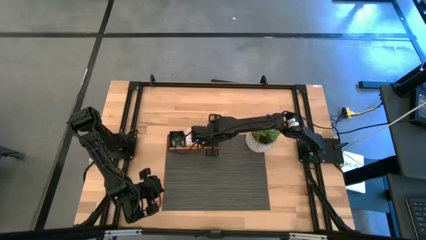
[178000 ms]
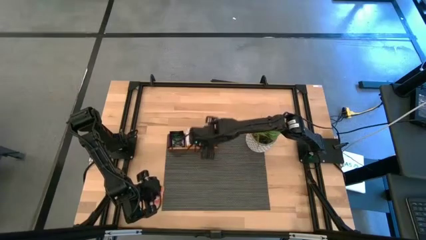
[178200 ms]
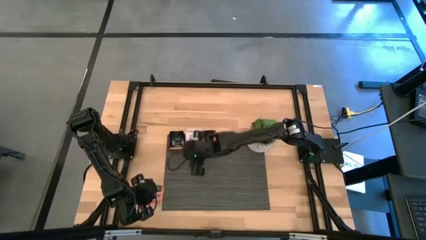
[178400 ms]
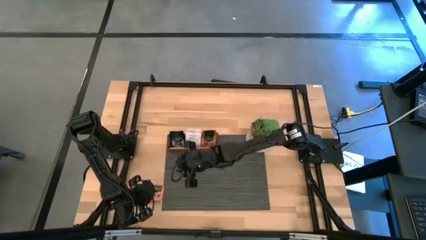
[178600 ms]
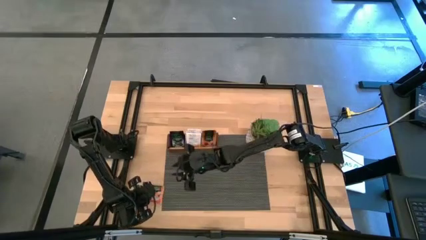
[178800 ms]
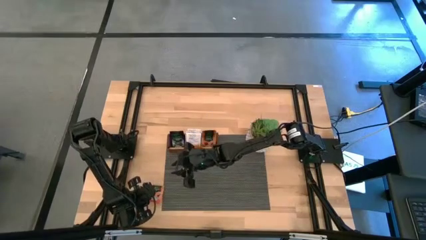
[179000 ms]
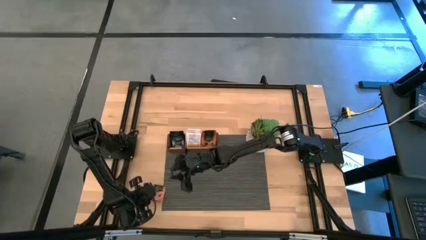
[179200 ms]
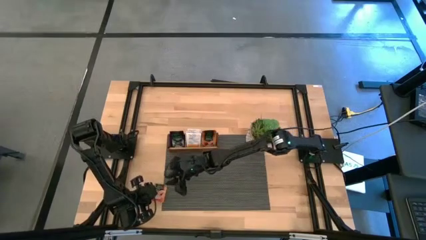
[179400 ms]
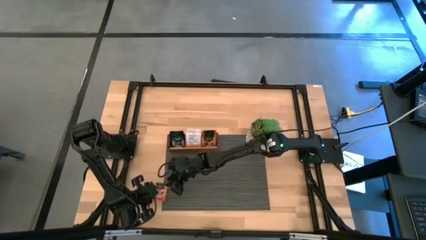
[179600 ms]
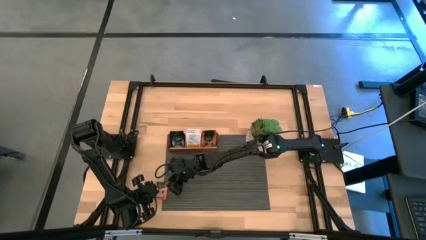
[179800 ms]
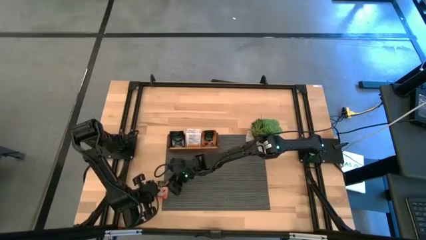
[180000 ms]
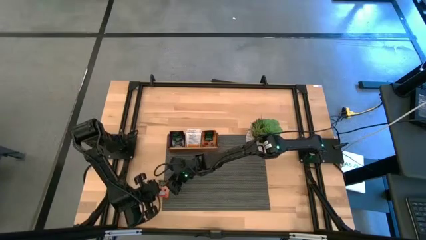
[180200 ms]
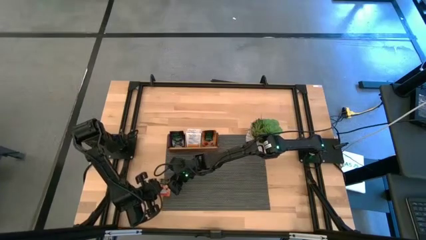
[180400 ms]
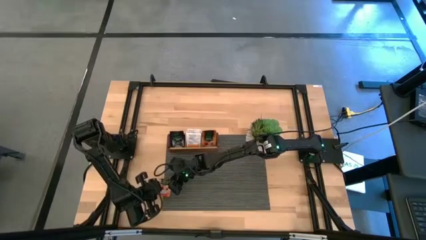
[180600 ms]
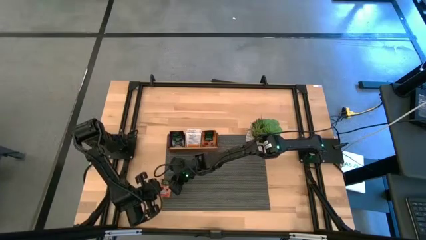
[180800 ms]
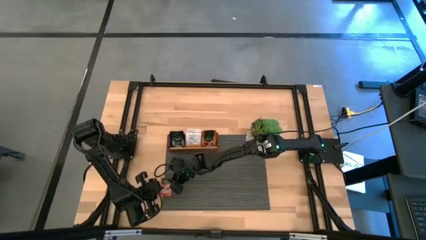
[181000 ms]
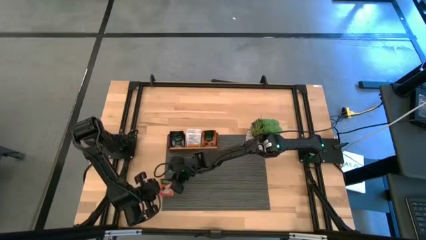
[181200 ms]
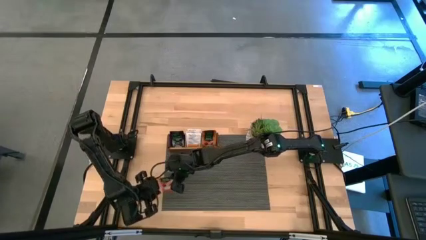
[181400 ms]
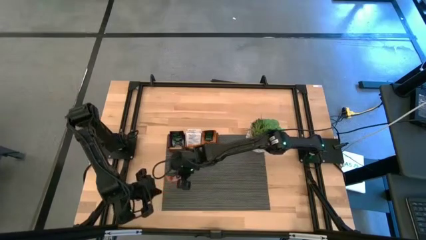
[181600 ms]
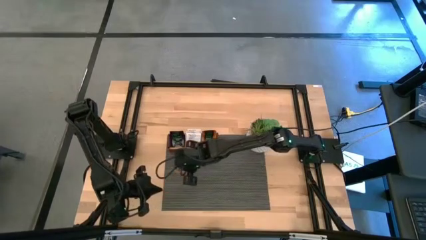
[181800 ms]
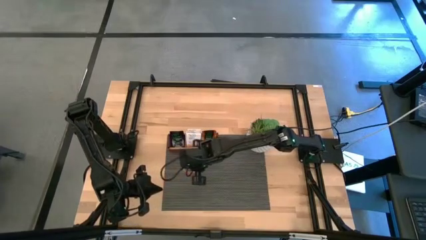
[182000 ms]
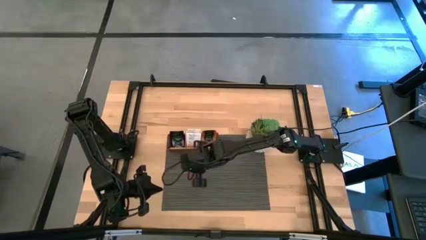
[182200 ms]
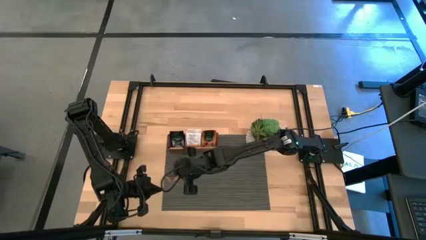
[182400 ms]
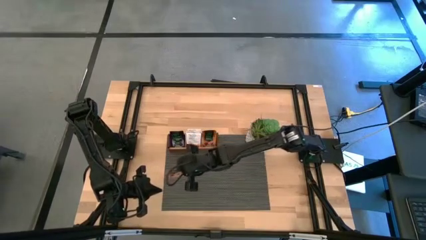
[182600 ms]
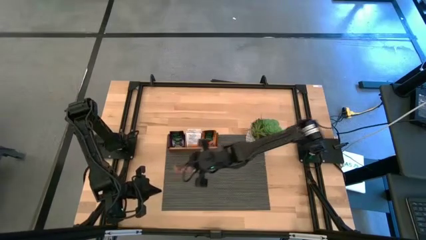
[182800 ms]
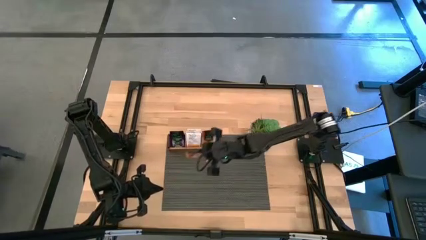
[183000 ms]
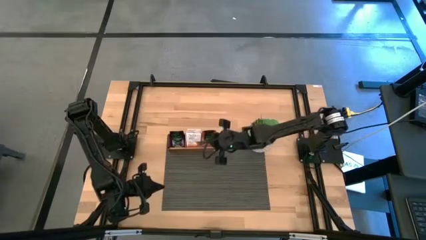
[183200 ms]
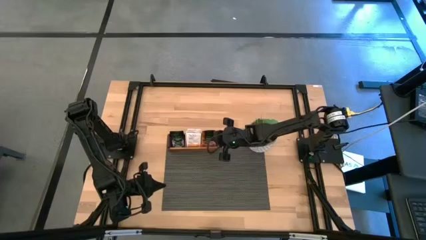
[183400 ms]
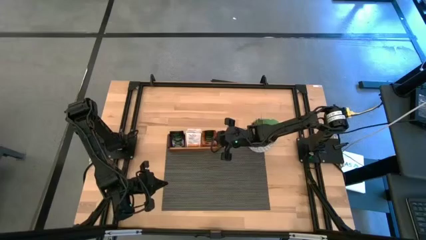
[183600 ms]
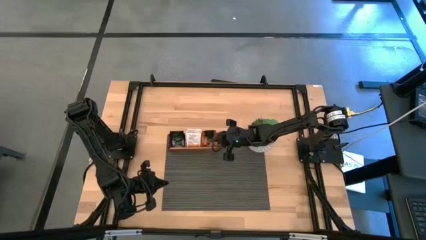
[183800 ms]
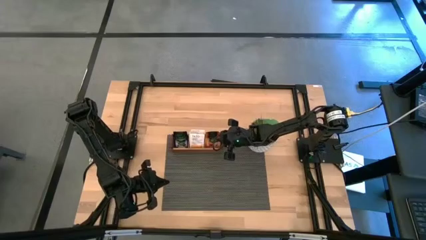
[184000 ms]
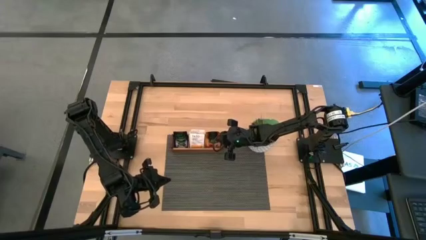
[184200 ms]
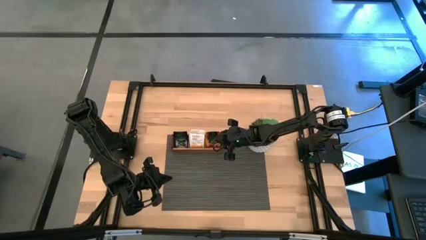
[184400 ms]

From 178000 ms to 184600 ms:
Task: Pick & Place Tea
Put the orange tea bag to the right section of the wooden organizer

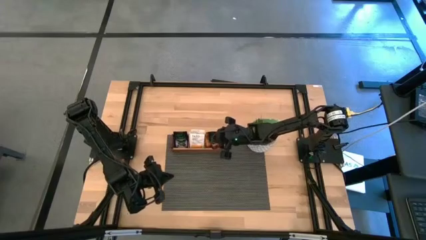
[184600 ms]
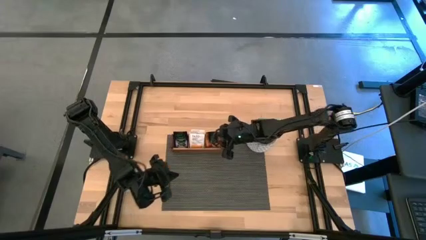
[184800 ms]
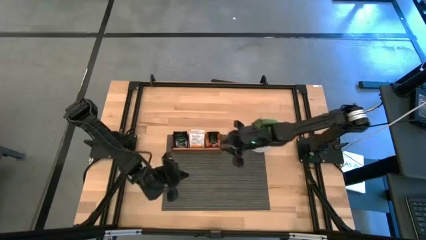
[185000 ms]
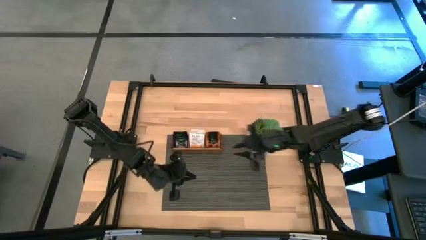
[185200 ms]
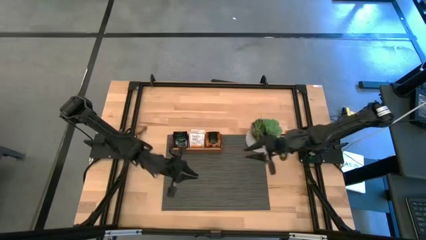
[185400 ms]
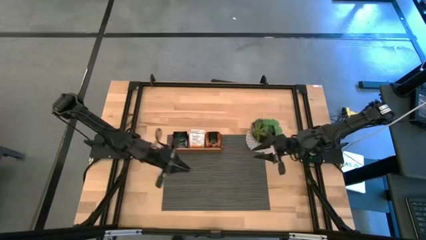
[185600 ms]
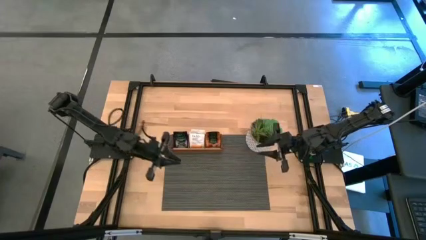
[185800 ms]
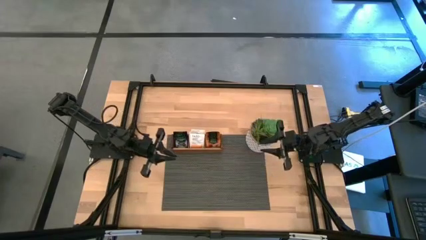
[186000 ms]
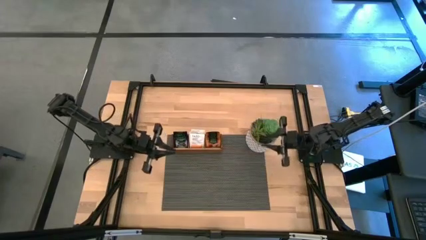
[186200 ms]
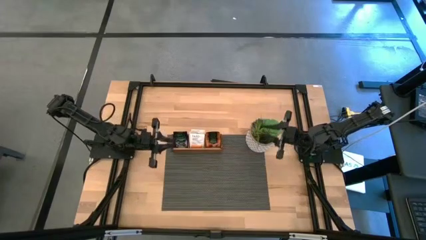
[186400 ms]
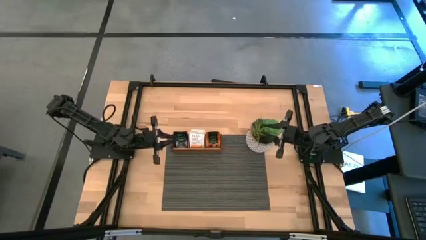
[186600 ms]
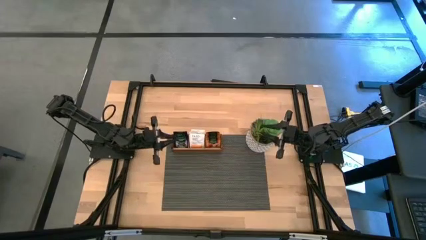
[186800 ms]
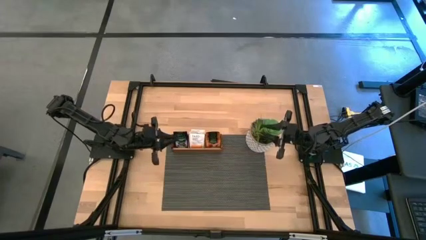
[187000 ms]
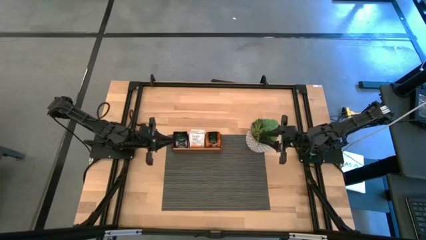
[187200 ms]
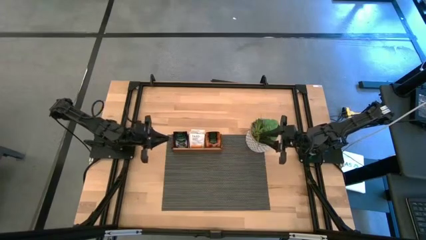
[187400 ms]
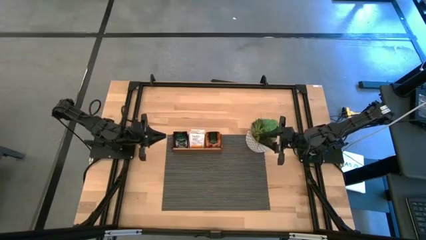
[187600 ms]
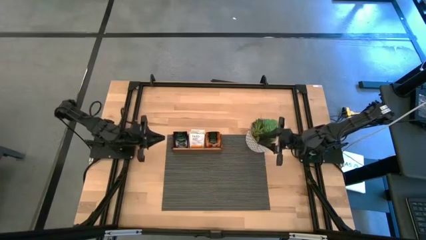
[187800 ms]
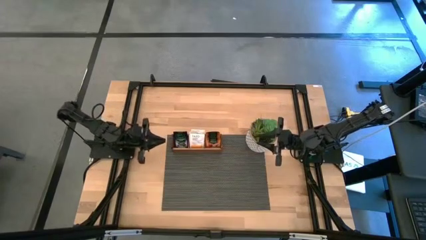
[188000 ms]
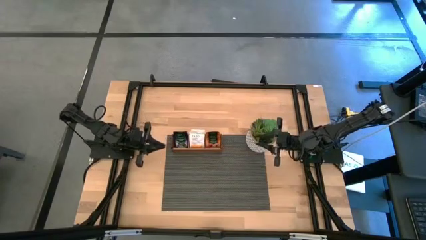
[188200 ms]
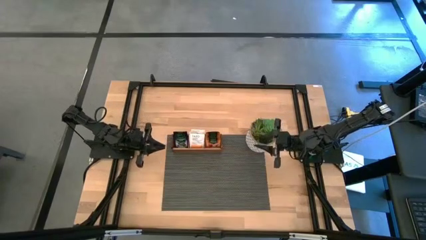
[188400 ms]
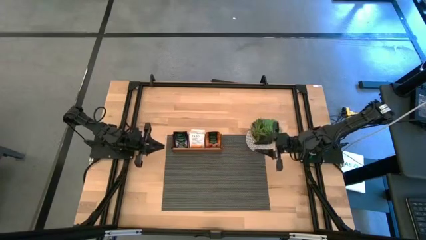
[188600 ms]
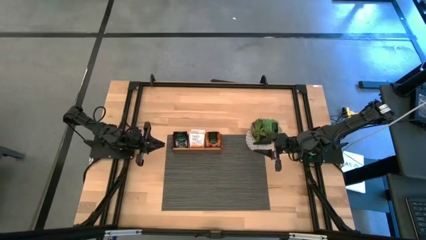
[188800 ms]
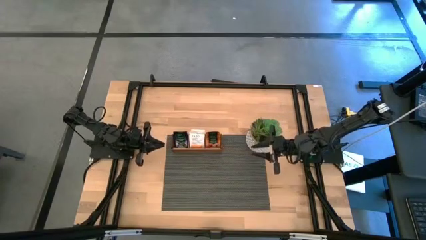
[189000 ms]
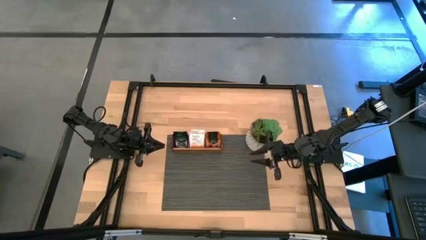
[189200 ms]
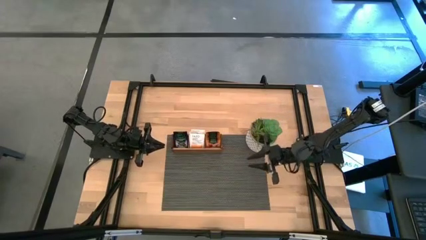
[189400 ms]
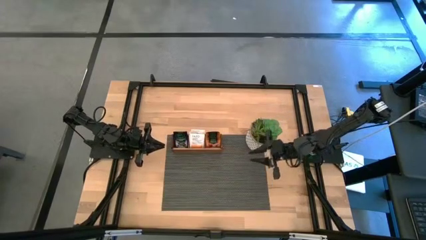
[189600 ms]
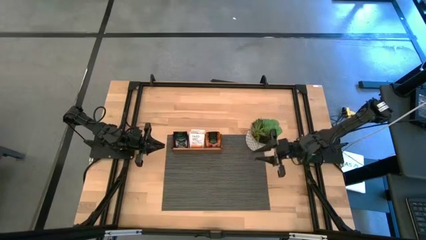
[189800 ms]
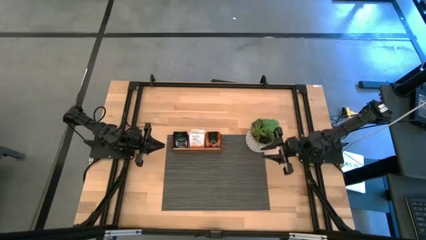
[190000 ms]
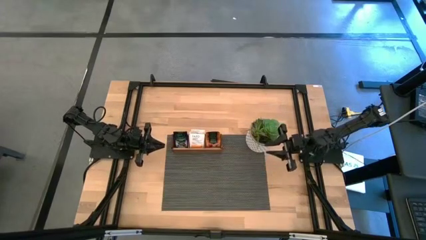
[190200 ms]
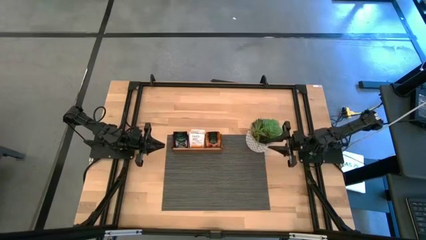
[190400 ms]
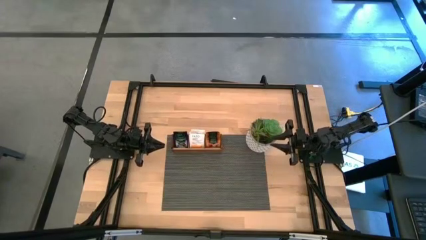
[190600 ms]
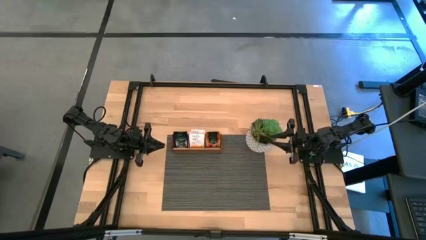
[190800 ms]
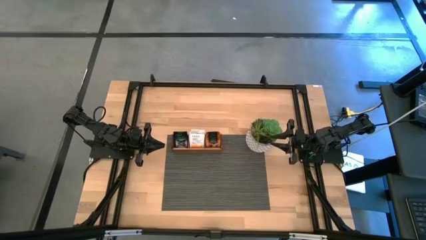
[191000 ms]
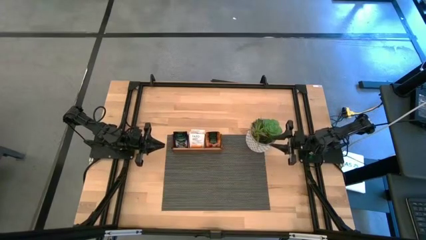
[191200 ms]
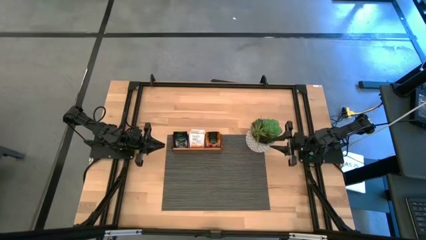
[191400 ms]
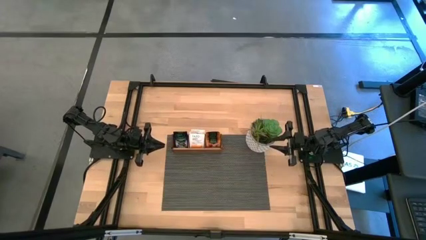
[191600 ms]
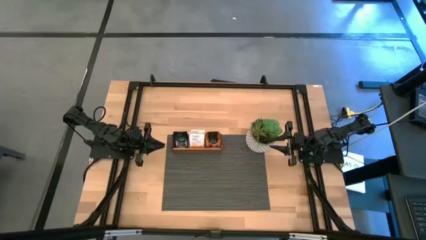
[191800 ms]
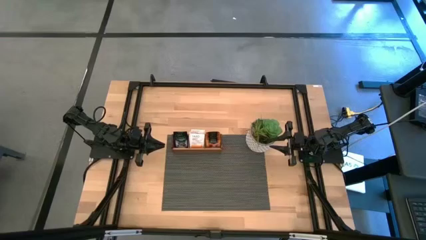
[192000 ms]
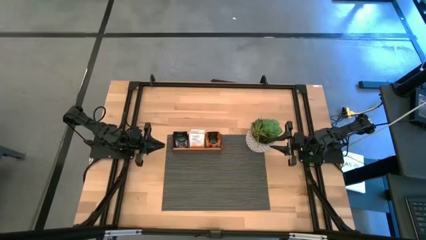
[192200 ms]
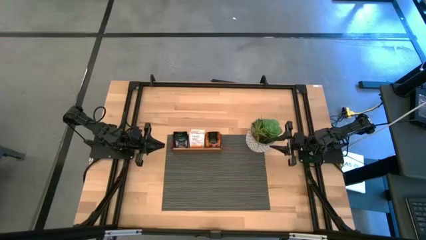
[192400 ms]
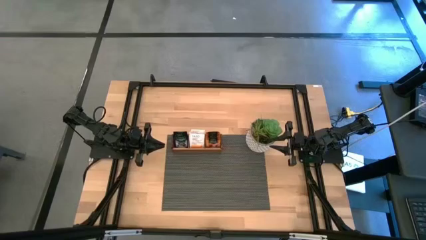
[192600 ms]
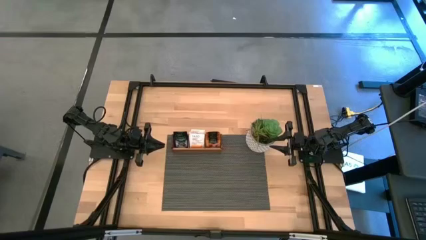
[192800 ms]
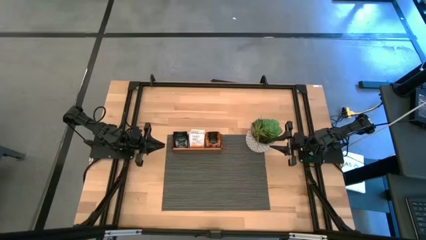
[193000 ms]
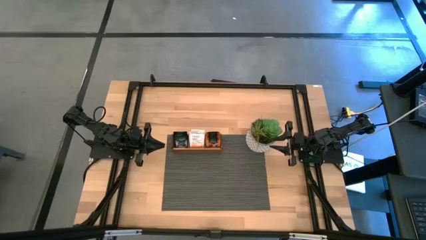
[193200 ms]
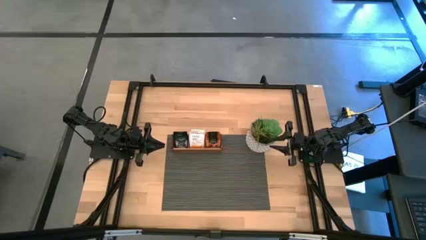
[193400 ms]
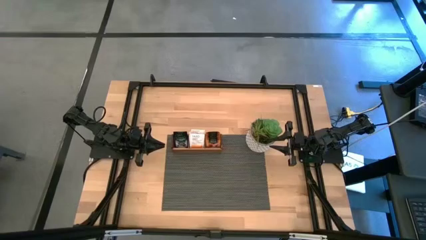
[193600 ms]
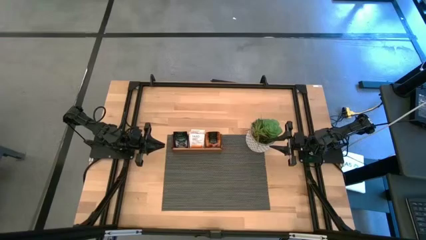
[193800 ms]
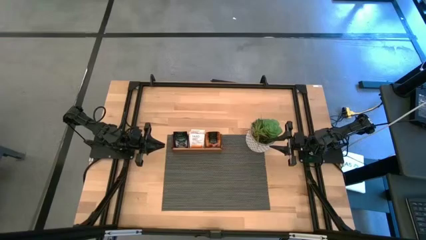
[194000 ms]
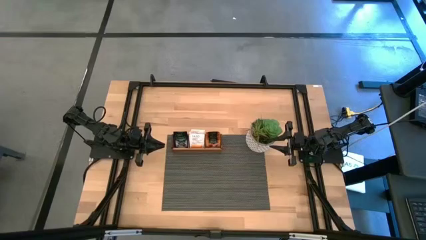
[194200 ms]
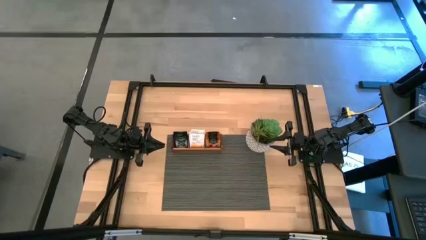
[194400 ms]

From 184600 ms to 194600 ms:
Return to Home Position
